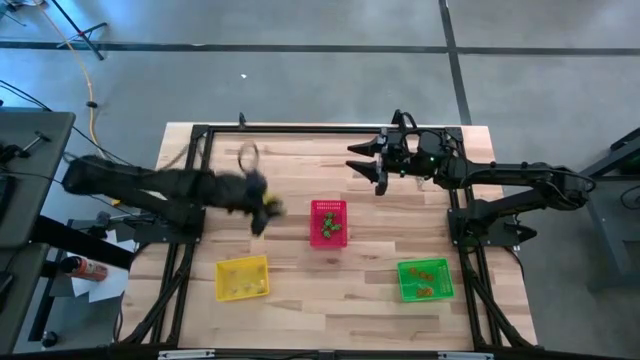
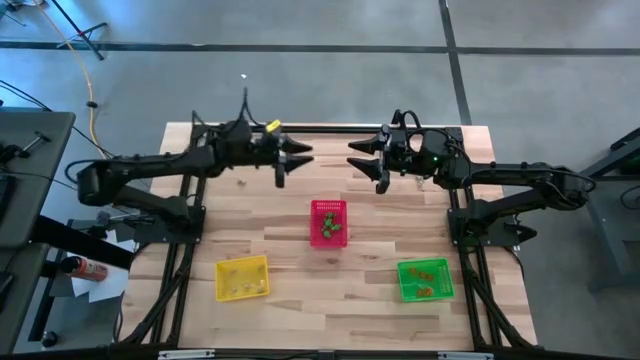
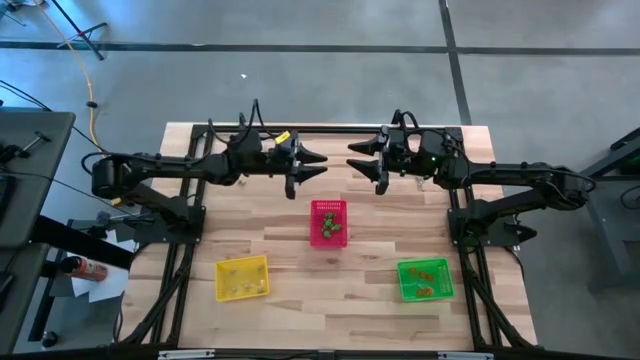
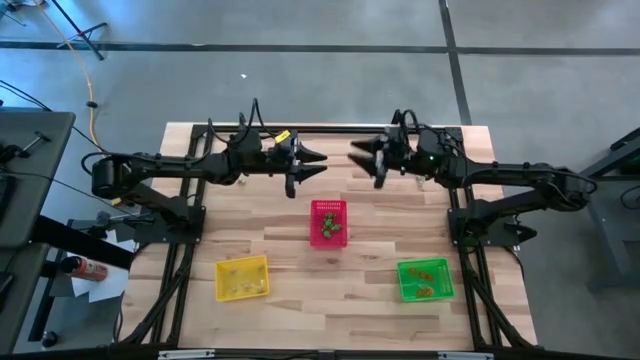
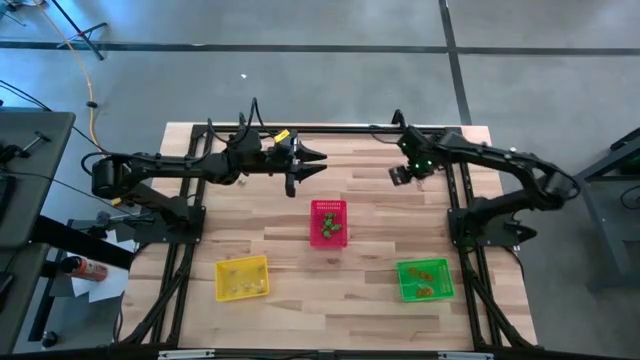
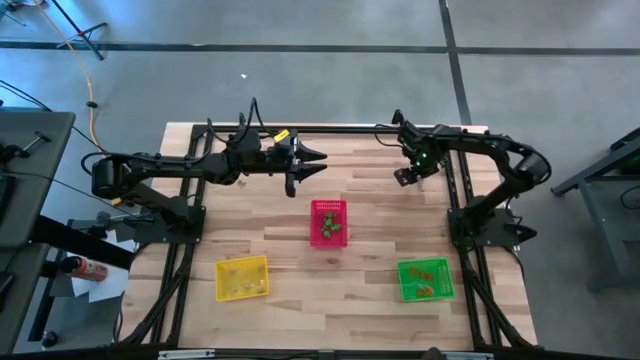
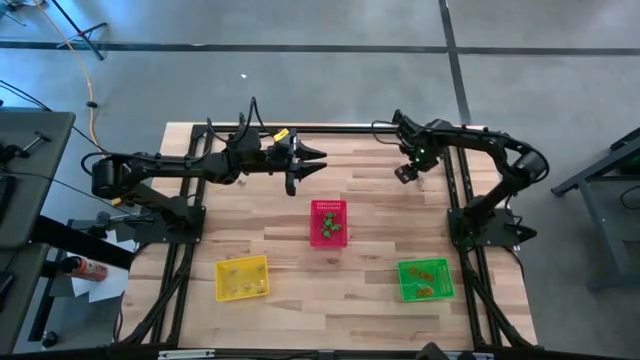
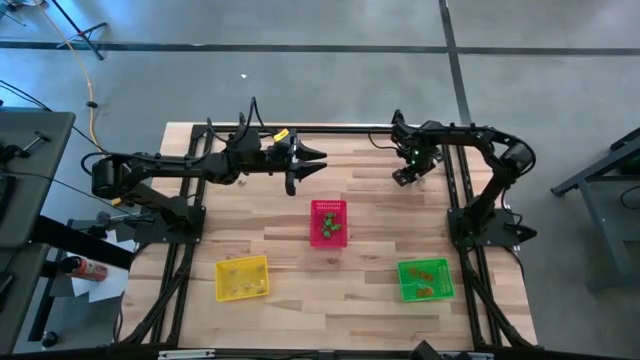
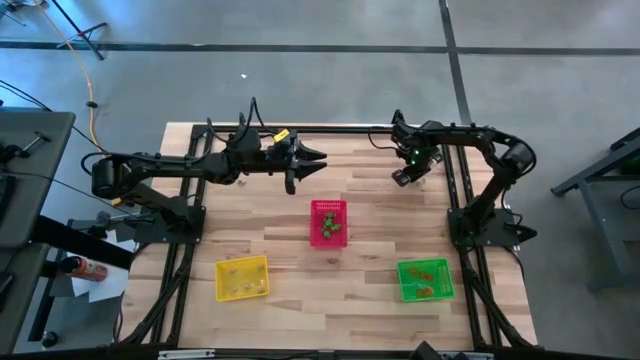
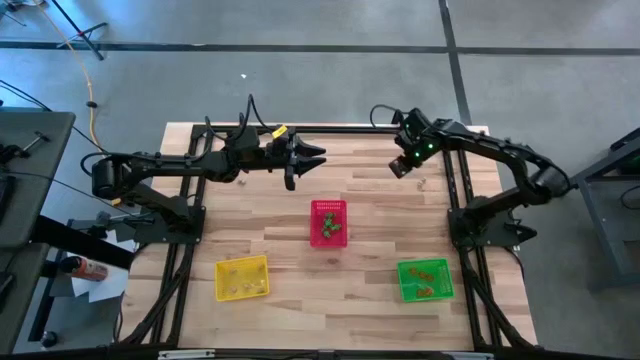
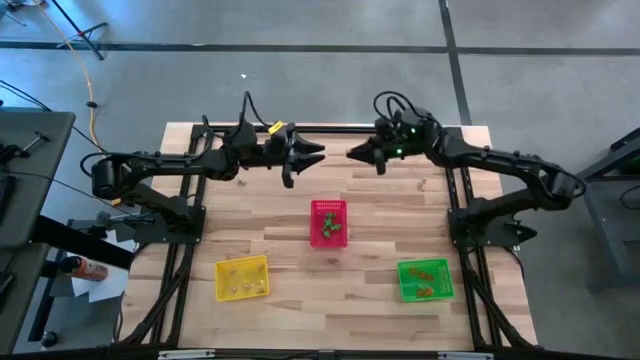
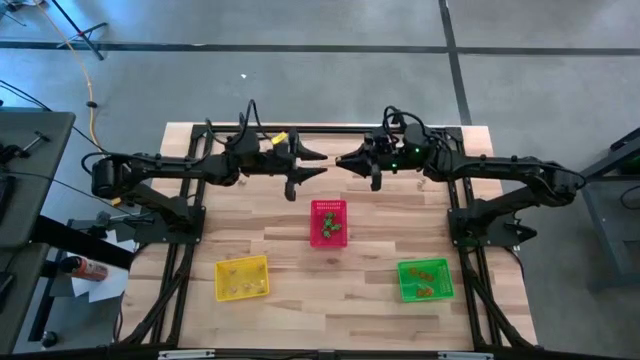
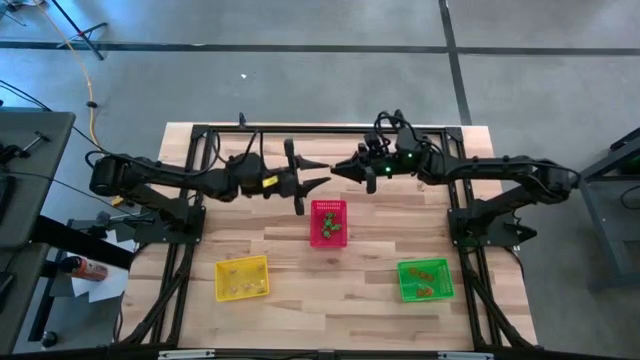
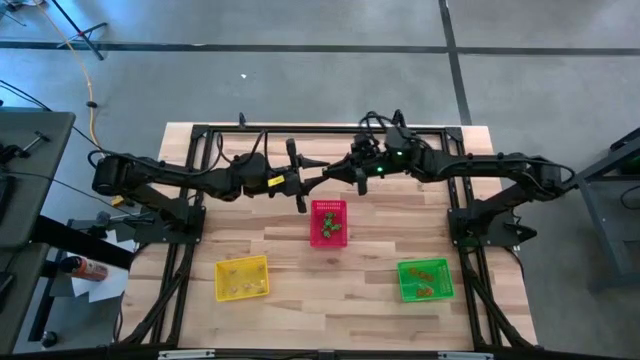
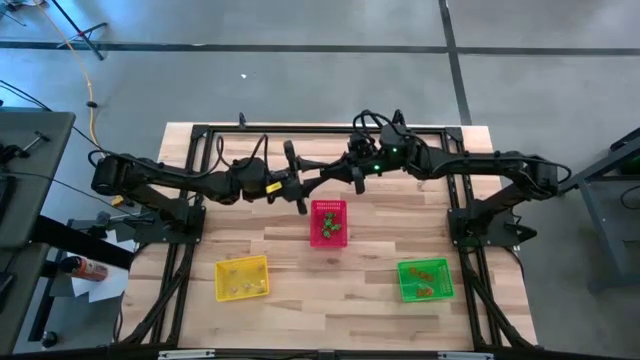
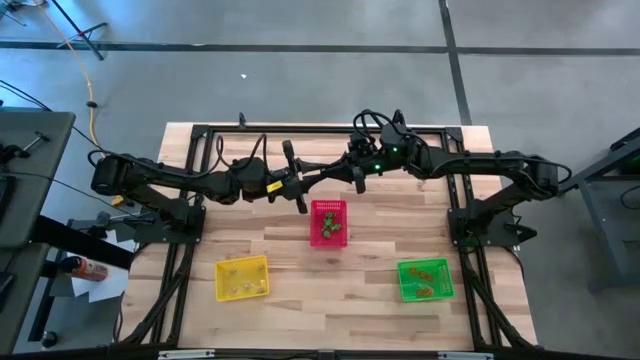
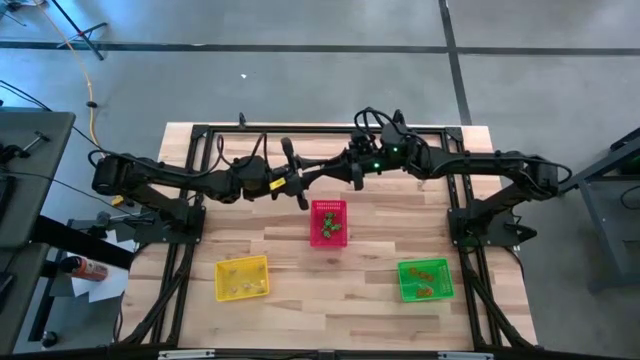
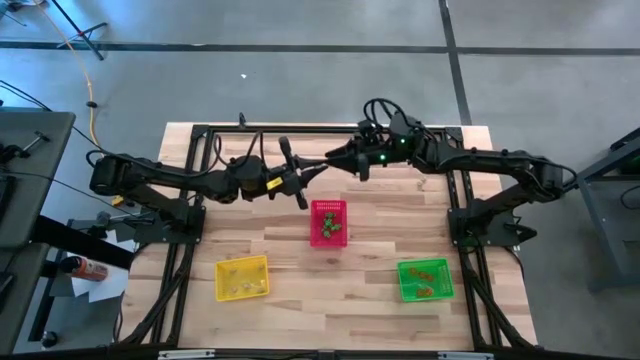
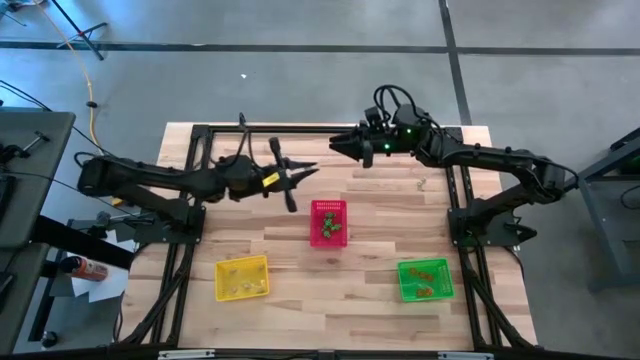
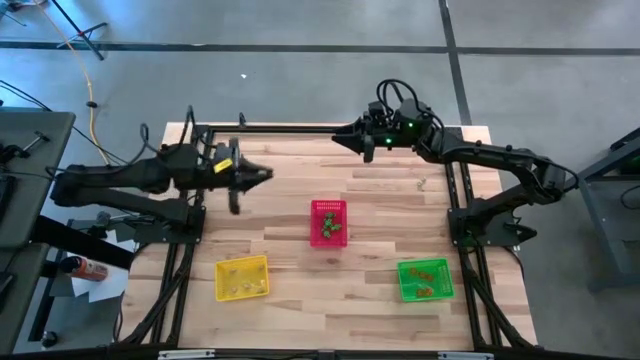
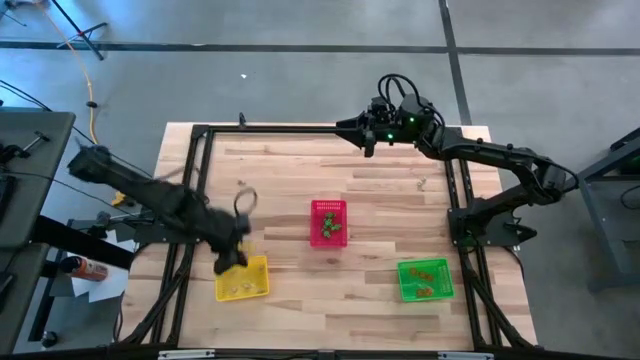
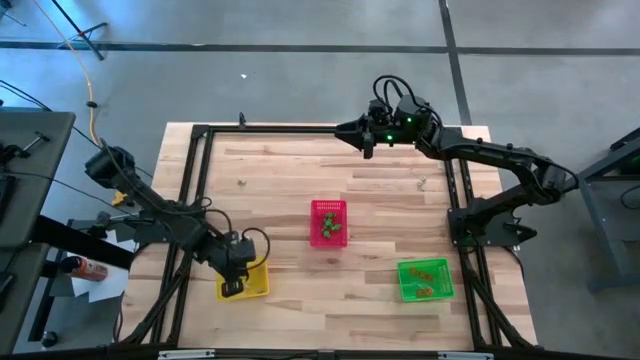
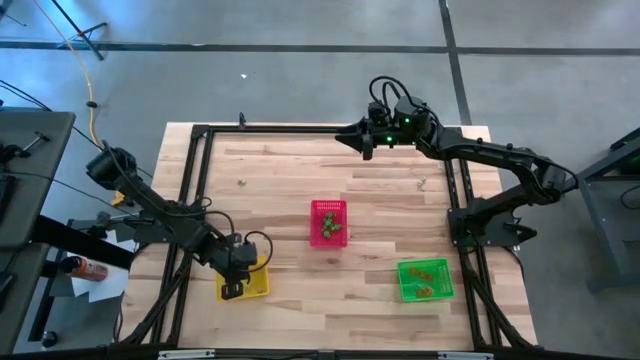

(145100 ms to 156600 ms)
Task: Sort Halloween decoration
Put the white skull toy into the yellow bin

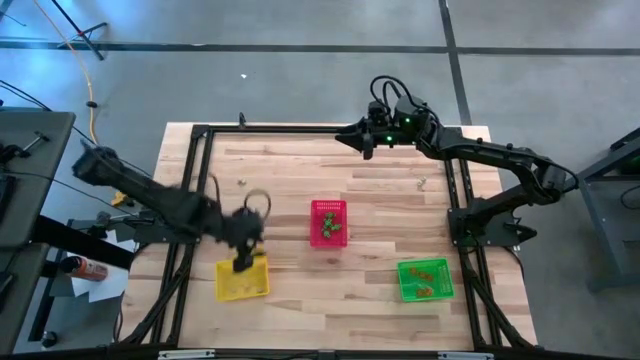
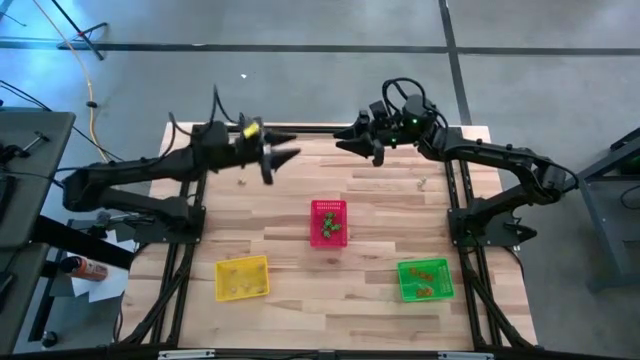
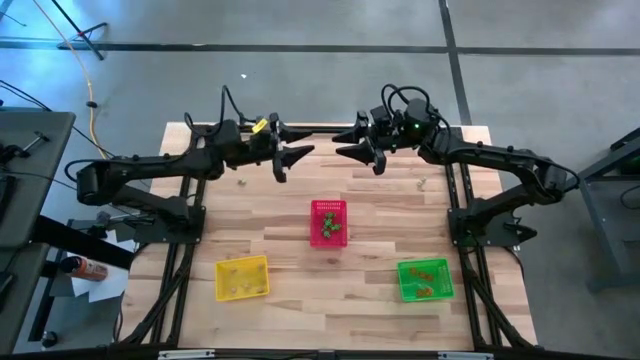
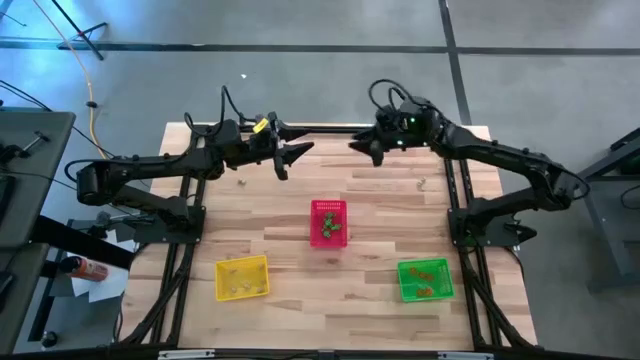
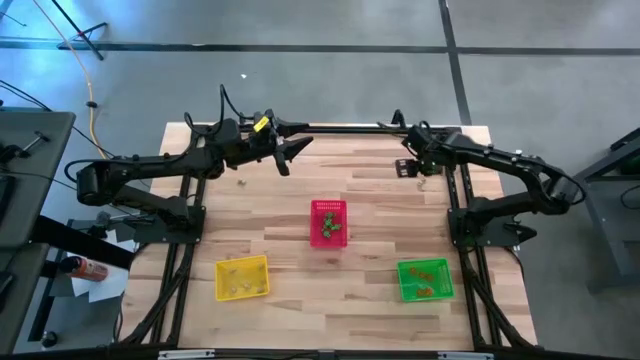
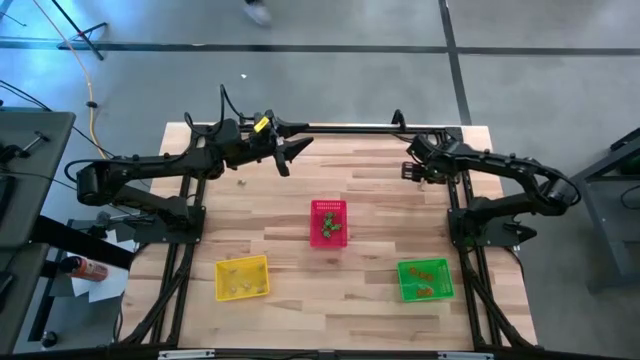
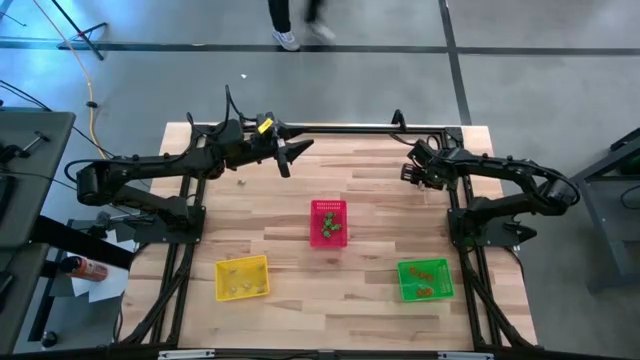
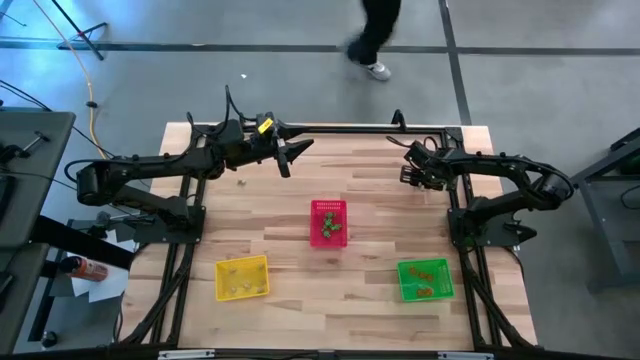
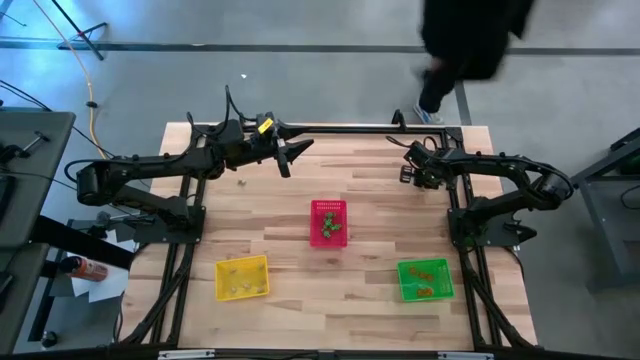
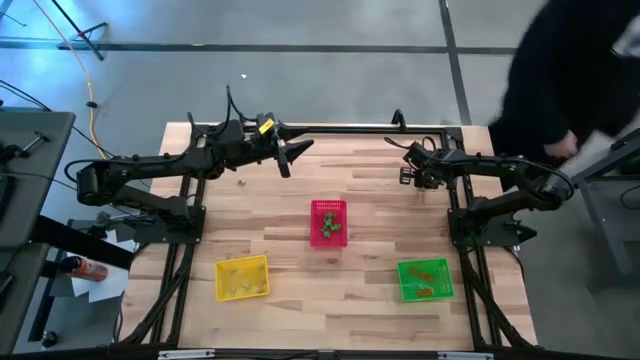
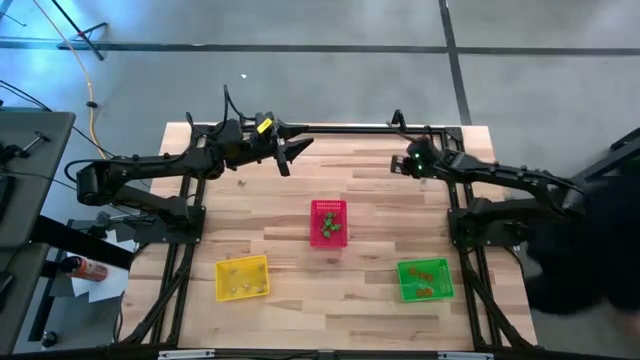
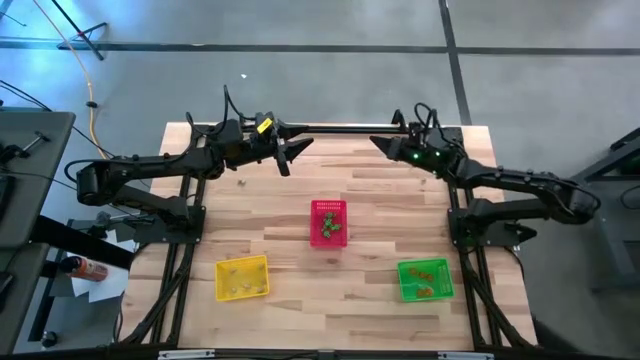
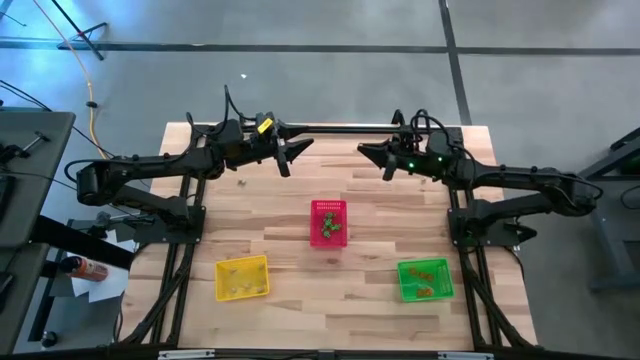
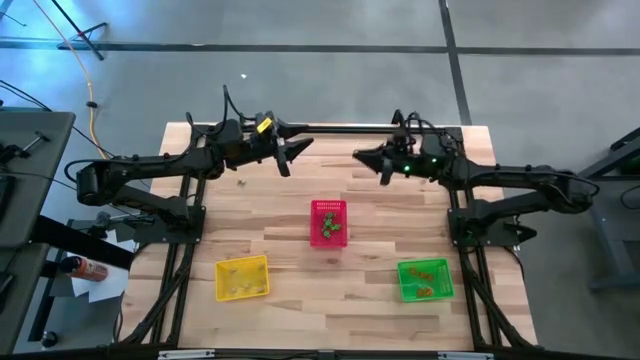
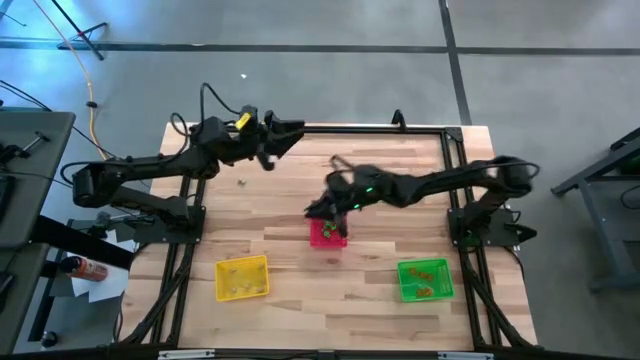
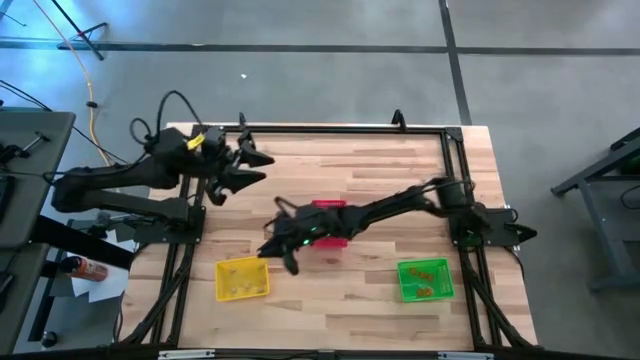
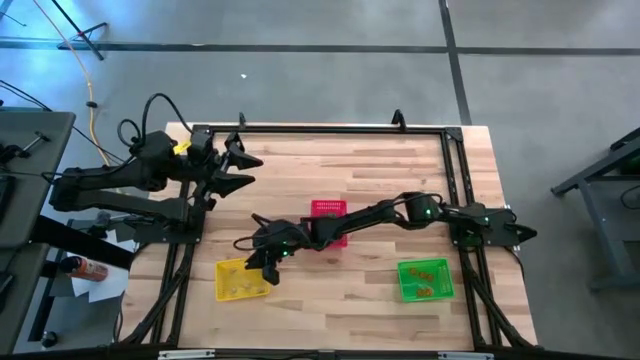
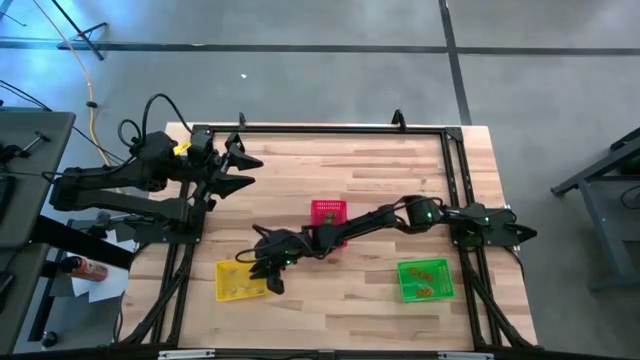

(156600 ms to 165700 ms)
Put the white skull toy into the yellow bin

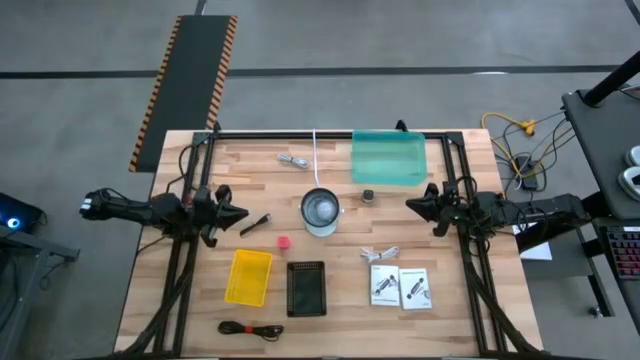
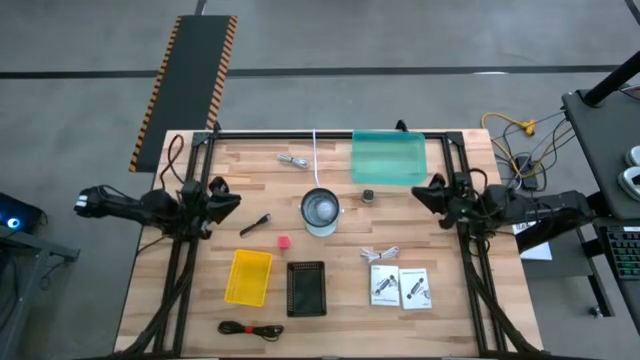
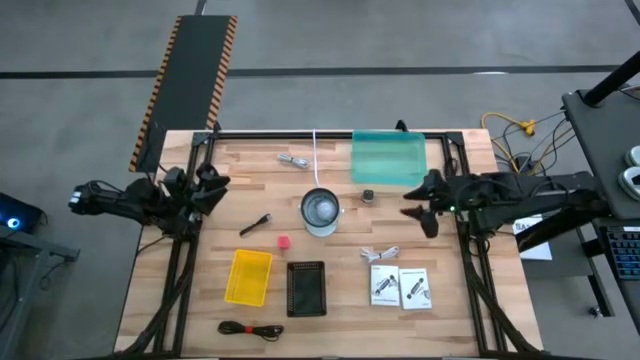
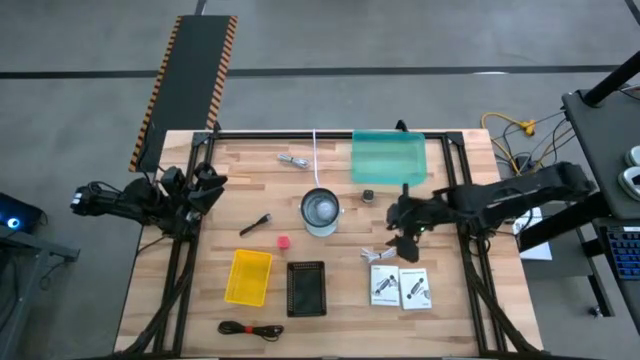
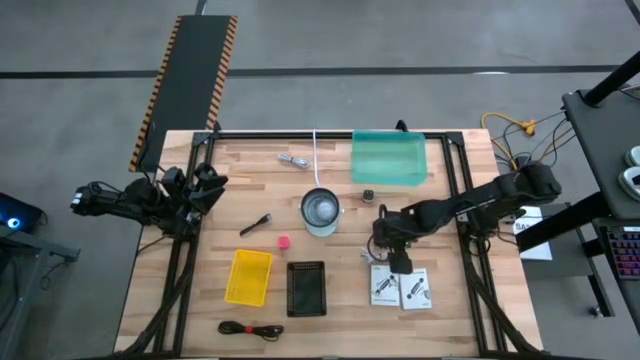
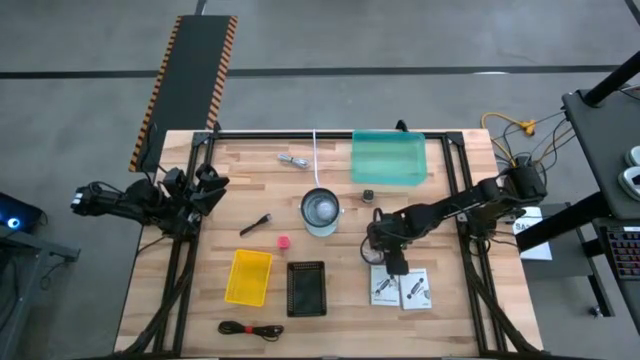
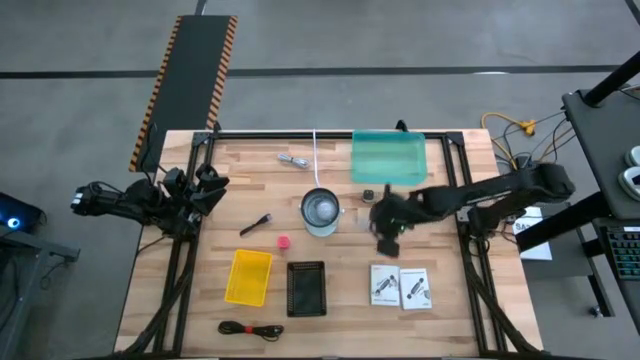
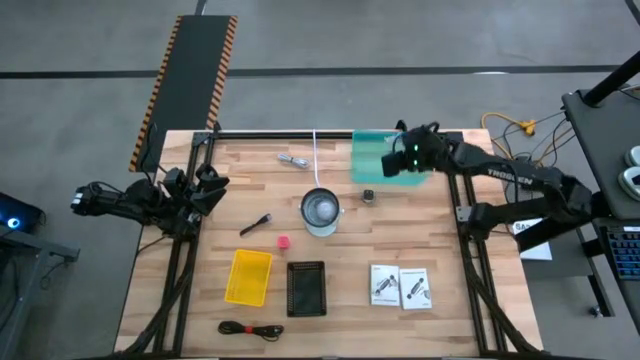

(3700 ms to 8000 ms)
Task: Pick and place items into bin
Put the white USB cable into the green bin
